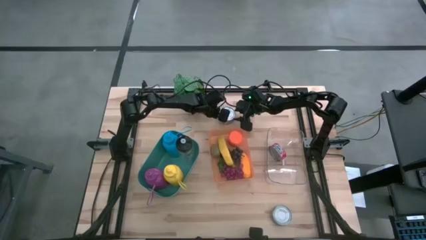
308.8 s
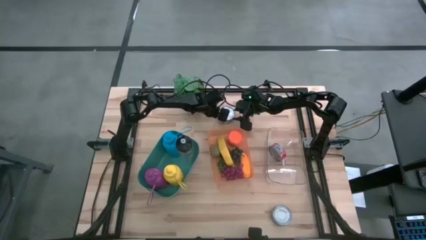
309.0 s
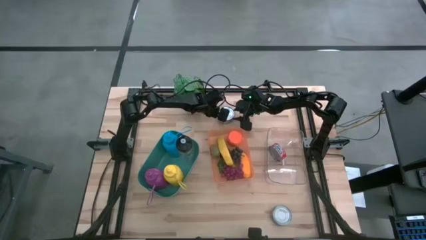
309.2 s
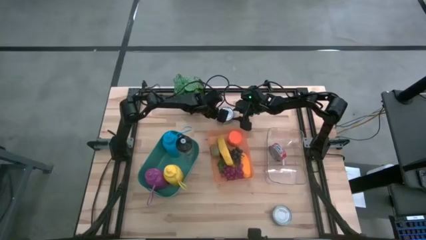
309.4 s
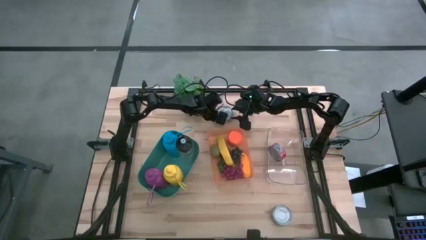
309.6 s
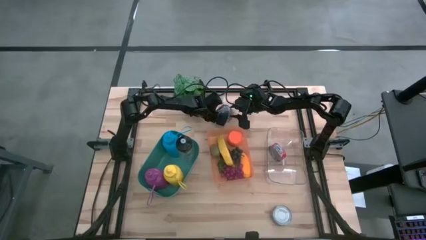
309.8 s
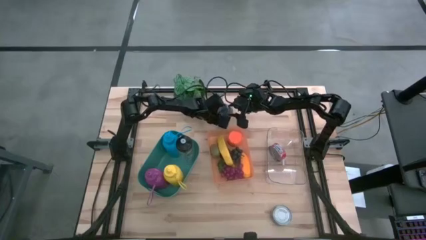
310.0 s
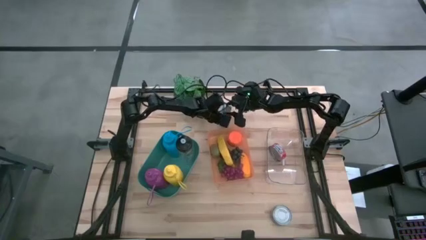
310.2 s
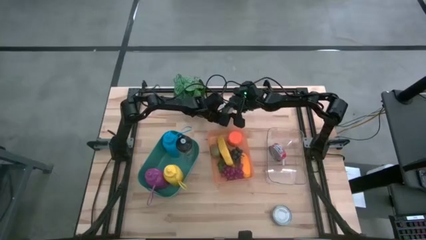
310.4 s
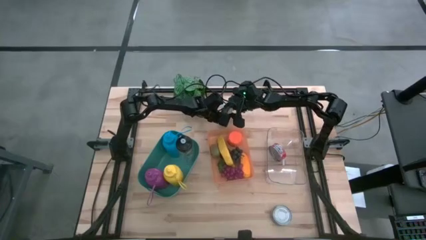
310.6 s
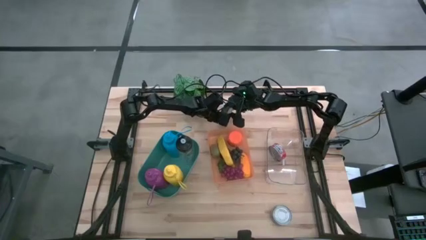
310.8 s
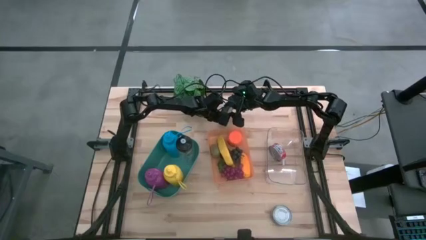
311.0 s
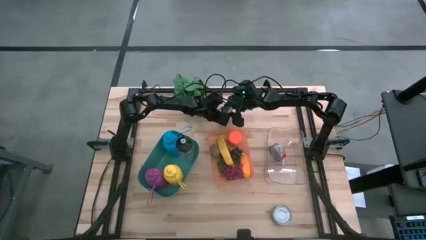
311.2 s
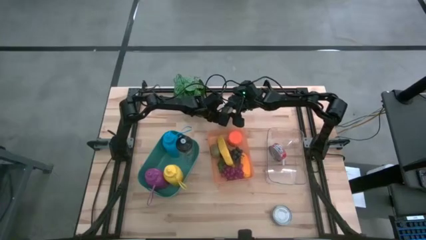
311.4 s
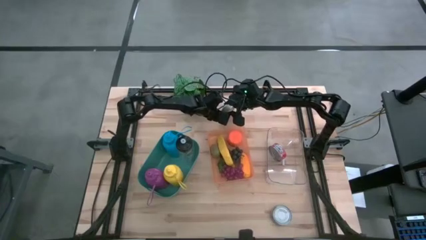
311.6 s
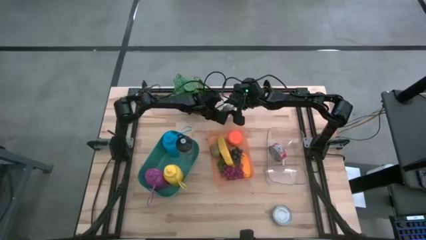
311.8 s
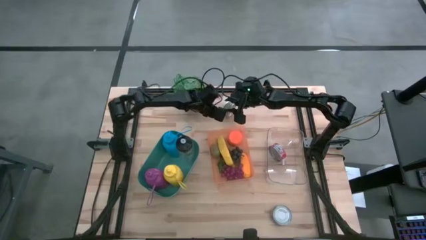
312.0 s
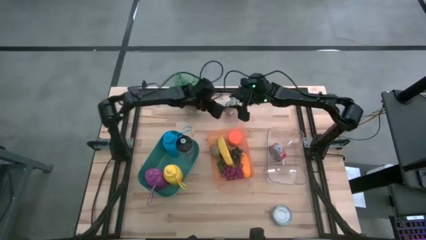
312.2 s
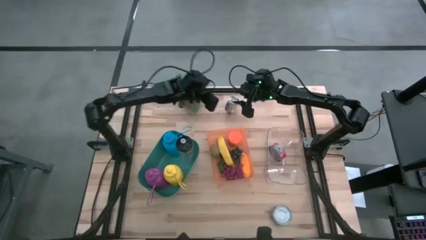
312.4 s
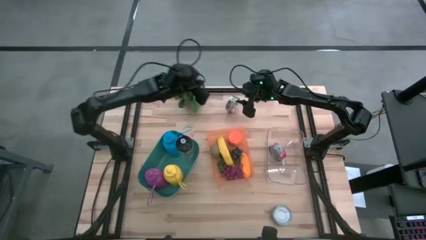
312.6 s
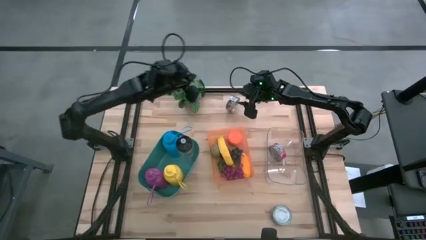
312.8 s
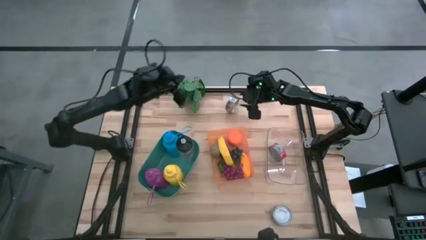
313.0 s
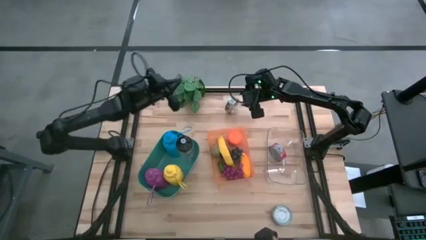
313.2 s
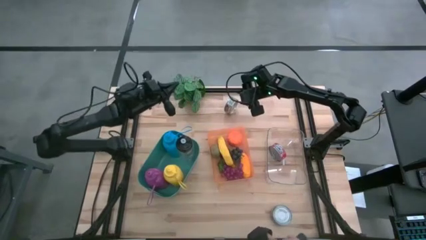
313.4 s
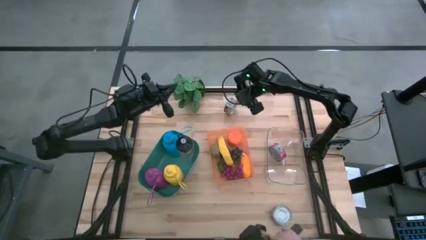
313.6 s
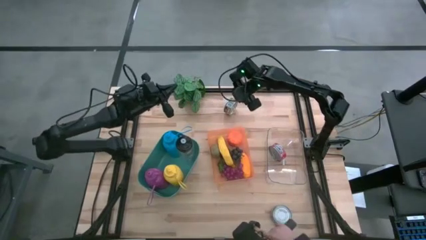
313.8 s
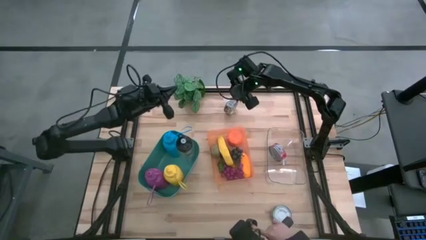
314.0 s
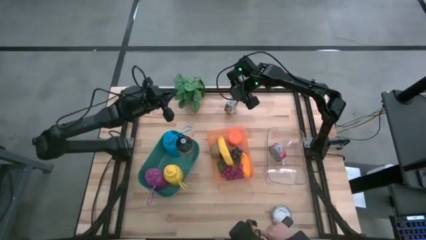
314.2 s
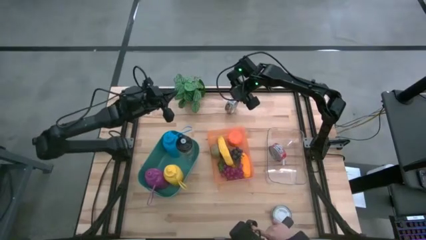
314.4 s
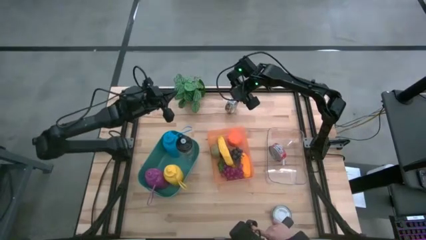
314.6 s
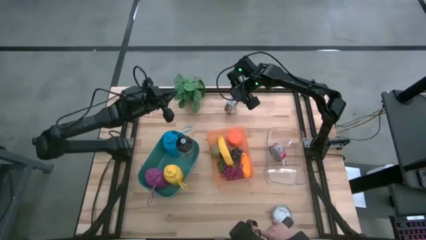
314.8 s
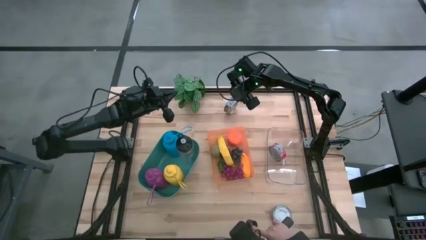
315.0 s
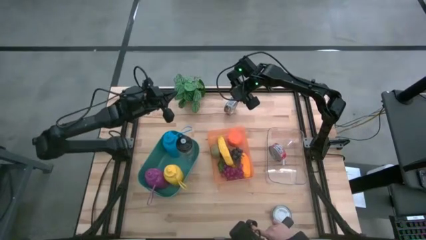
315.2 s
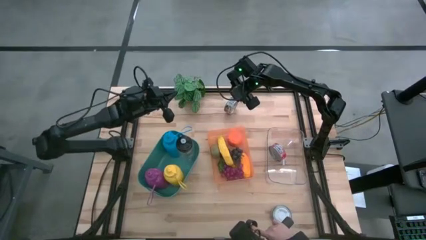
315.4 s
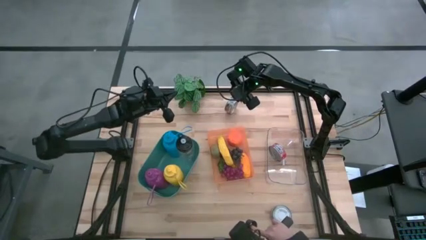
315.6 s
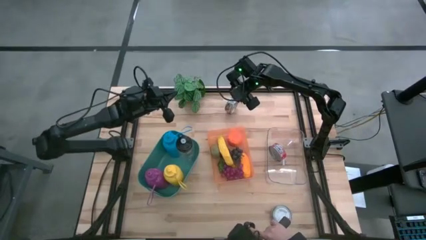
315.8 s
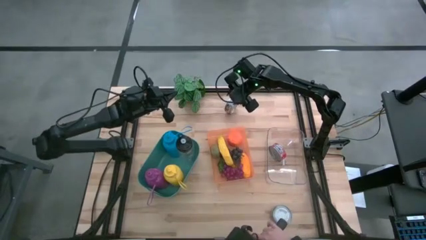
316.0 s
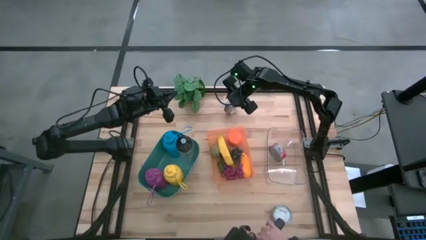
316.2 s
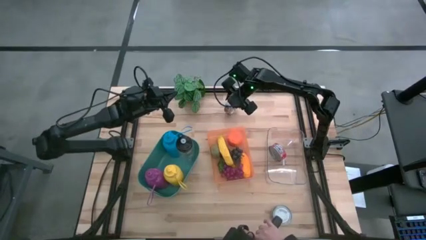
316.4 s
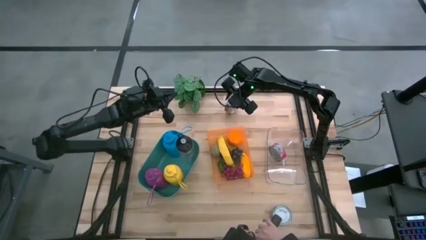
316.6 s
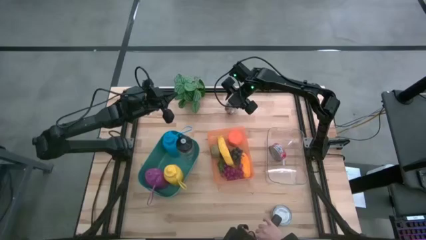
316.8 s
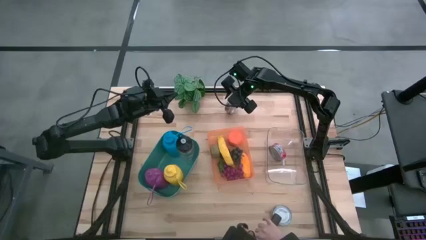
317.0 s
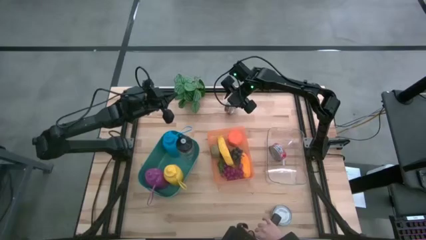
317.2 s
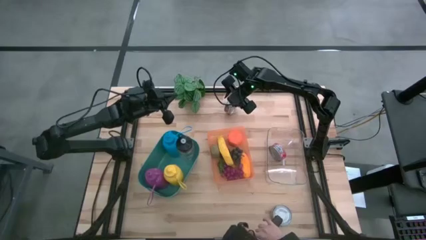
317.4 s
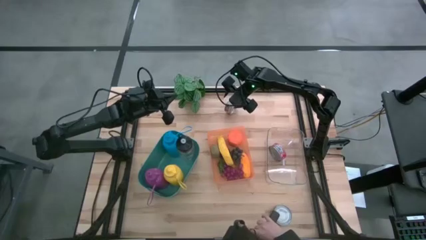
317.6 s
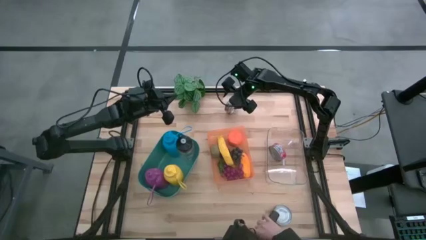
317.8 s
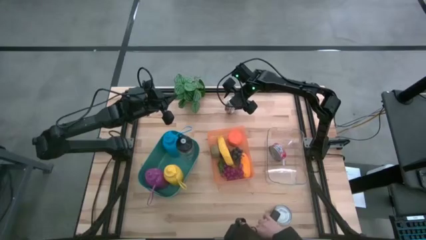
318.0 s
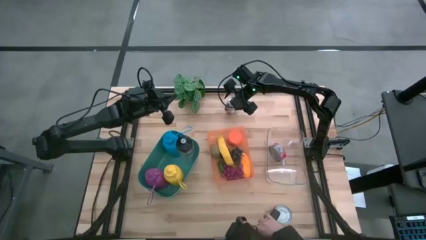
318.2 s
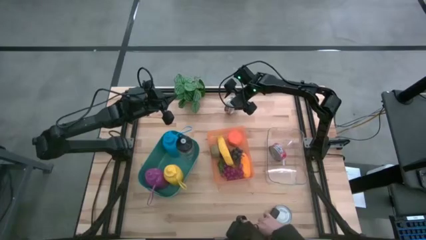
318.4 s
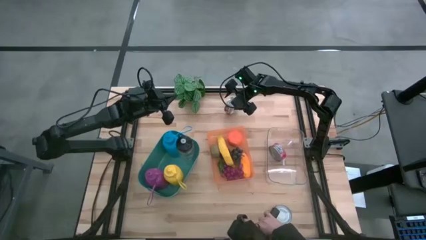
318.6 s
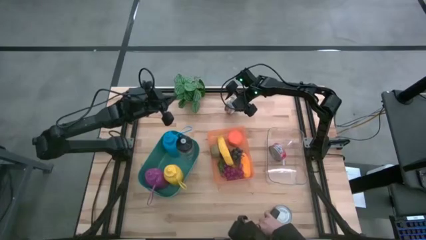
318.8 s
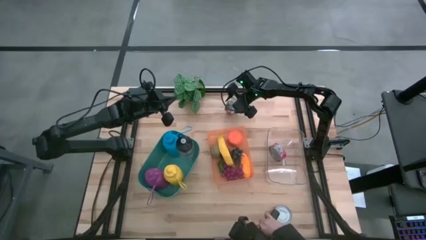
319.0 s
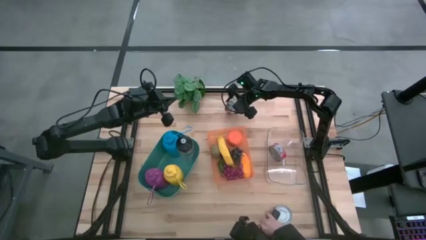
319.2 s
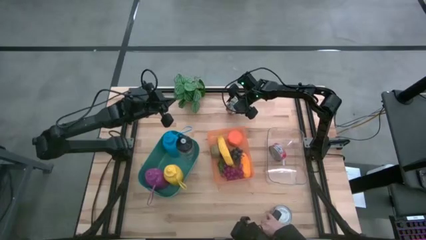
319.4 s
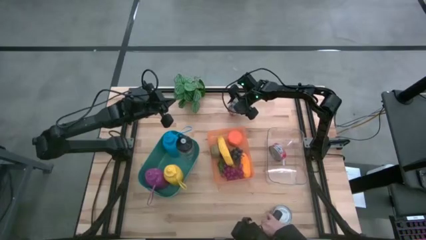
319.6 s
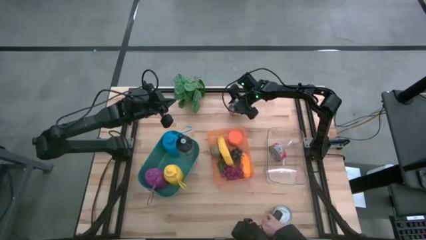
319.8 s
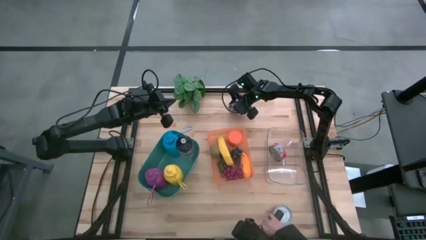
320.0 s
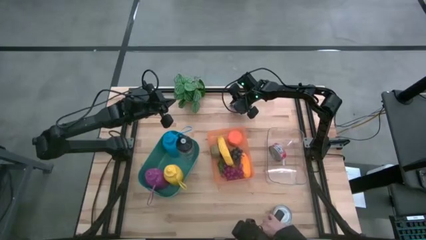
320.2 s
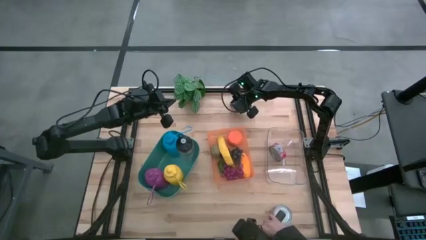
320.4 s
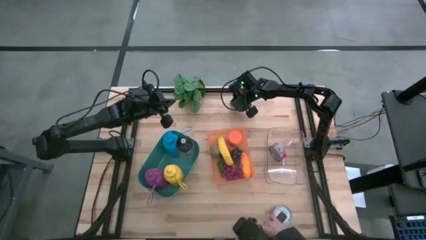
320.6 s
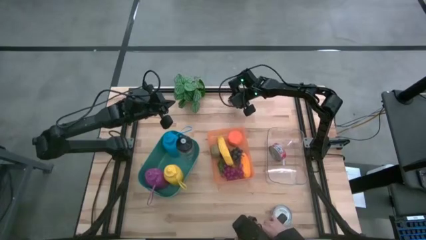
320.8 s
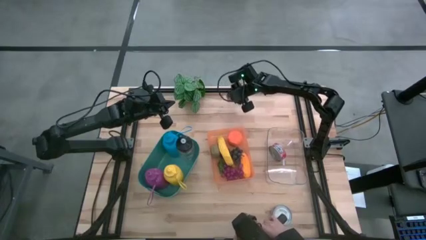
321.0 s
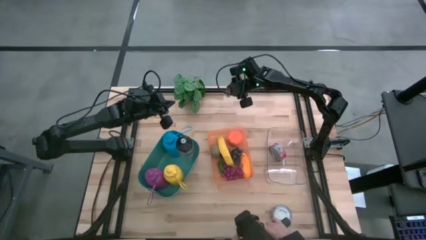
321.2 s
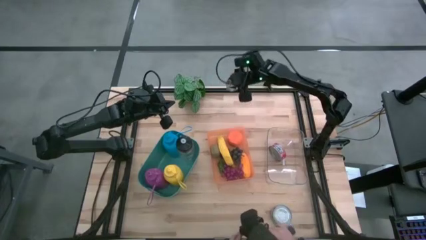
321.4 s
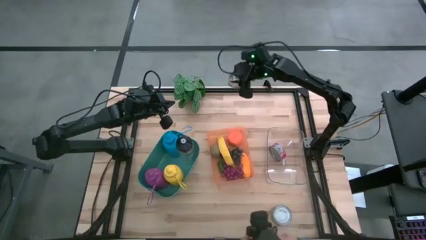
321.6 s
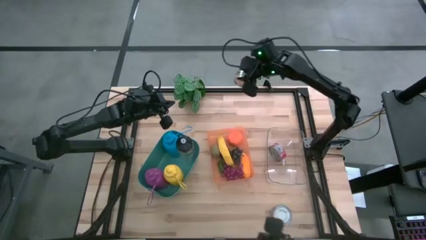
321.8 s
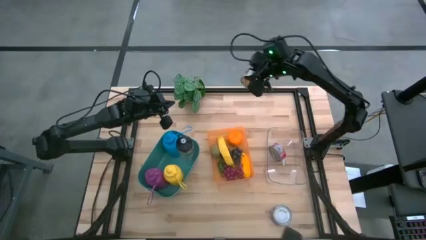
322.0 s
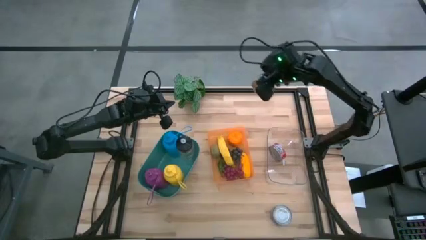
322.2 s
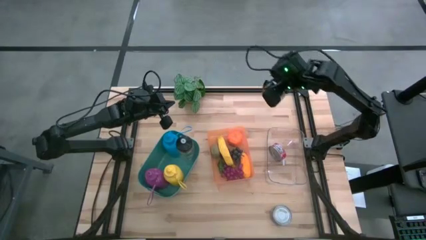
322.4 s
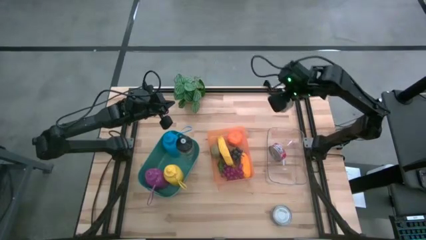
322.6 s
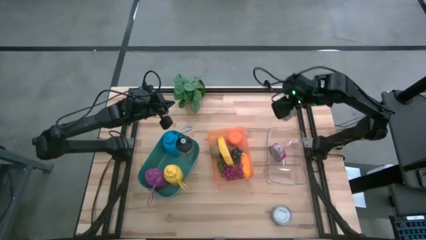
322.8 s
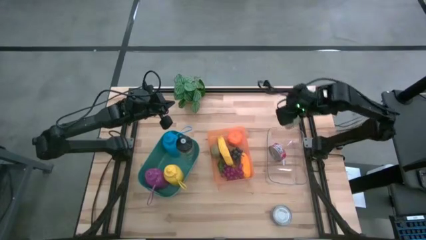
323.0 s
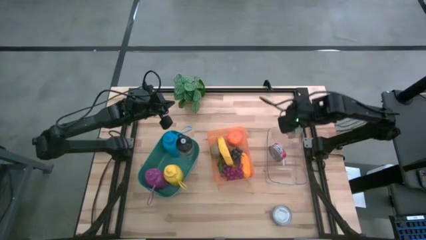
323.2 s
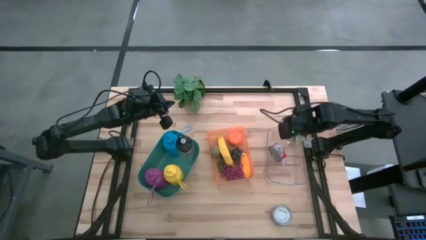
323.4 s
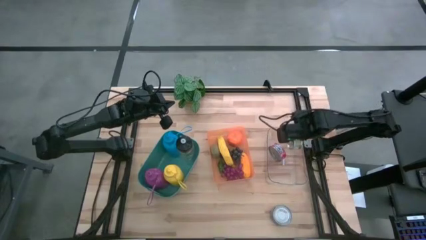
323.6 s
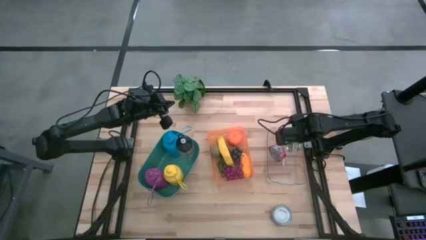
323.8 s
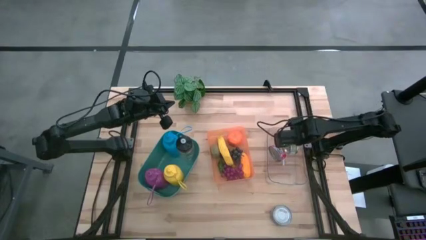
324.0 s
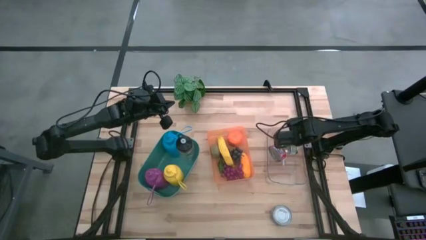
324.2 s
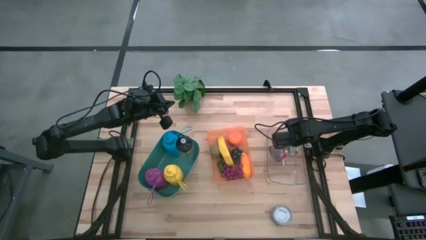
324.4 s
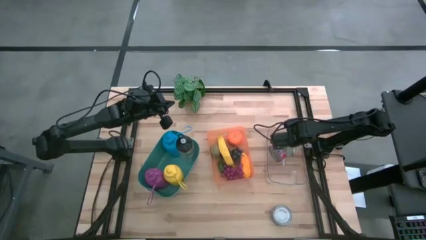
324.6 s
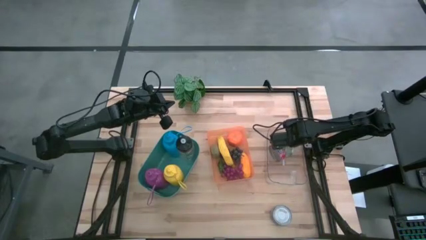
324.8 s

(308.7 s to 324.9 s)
Task: Pick & Place Food Item
Put the top green tuna can into the transparent bin
